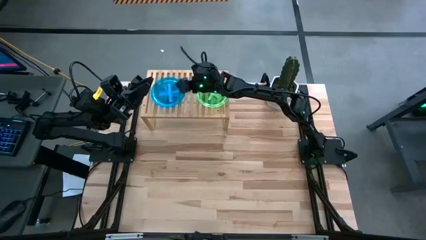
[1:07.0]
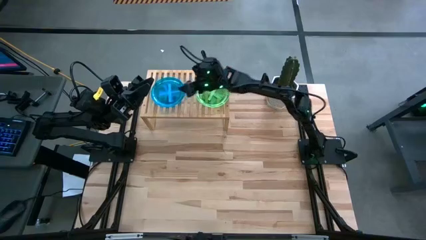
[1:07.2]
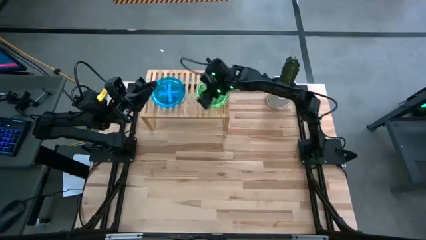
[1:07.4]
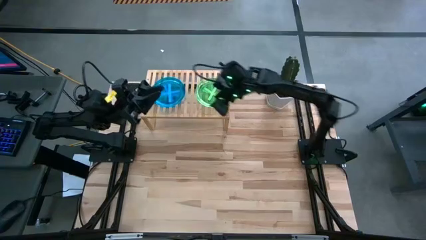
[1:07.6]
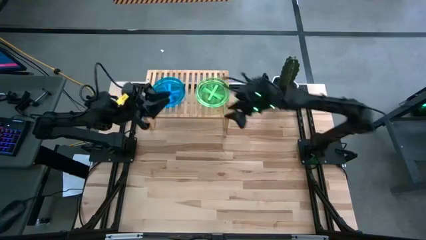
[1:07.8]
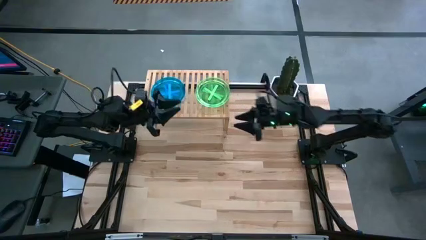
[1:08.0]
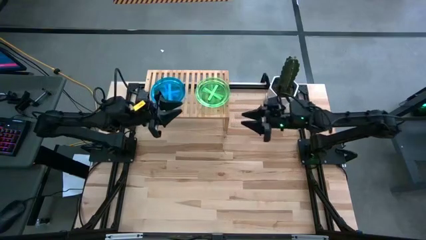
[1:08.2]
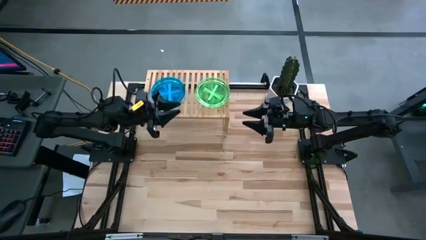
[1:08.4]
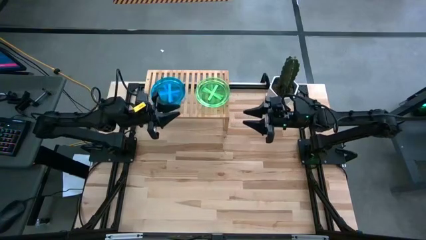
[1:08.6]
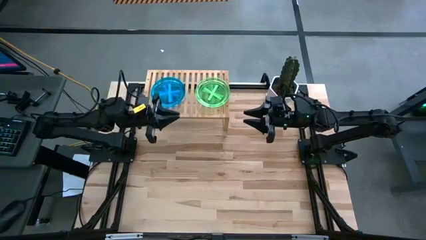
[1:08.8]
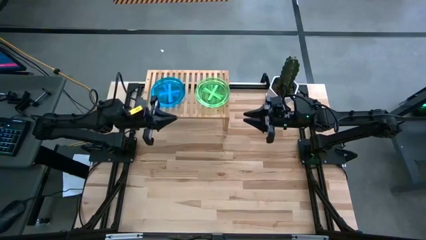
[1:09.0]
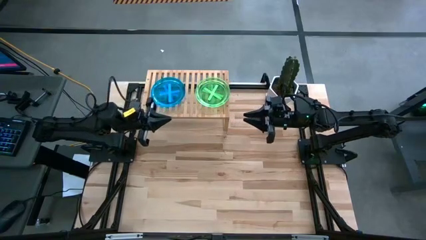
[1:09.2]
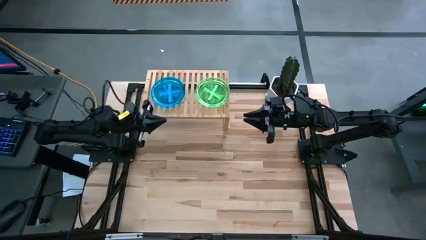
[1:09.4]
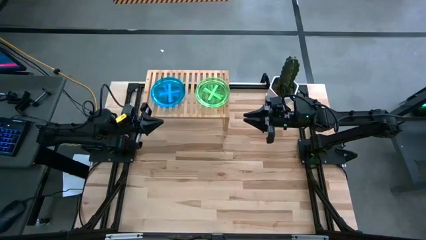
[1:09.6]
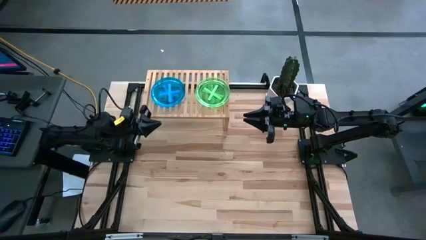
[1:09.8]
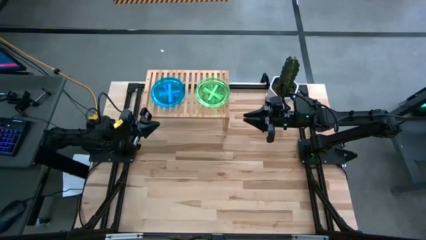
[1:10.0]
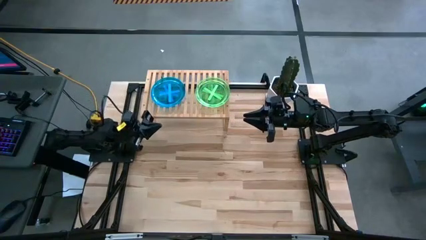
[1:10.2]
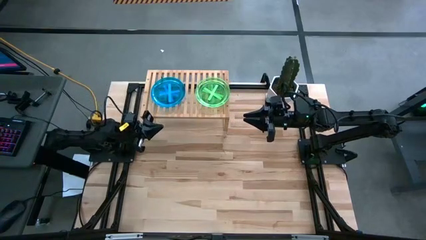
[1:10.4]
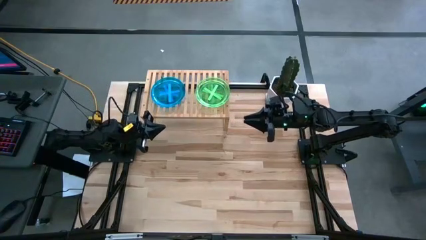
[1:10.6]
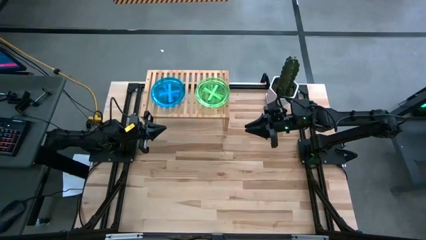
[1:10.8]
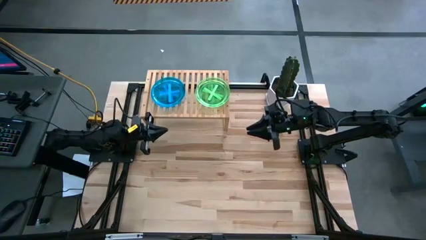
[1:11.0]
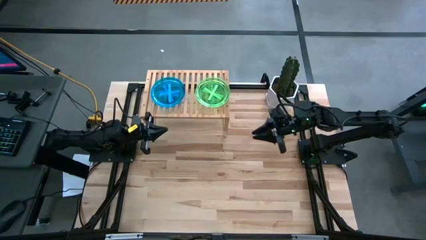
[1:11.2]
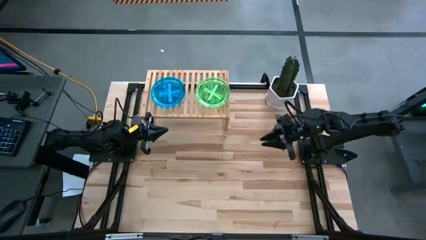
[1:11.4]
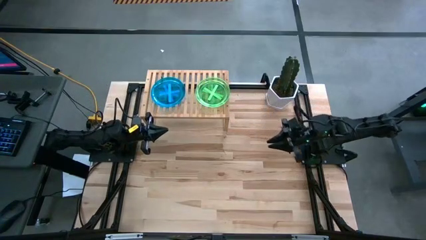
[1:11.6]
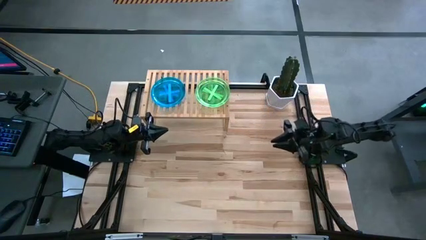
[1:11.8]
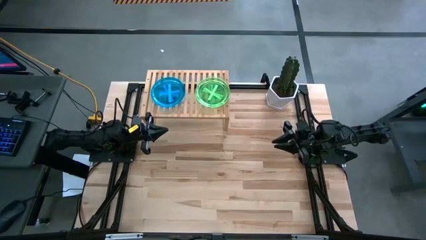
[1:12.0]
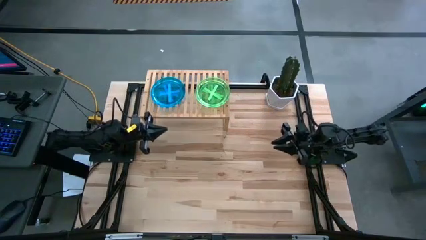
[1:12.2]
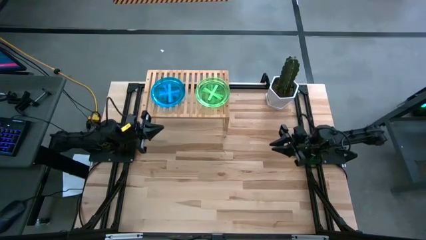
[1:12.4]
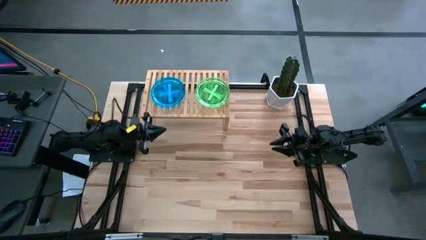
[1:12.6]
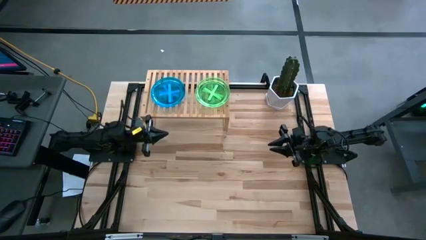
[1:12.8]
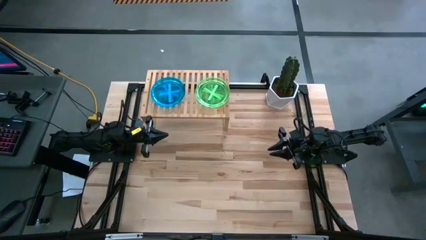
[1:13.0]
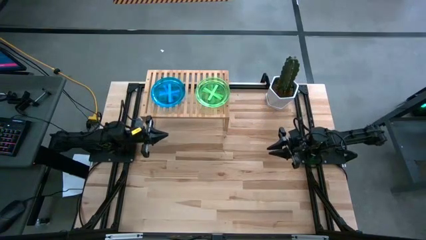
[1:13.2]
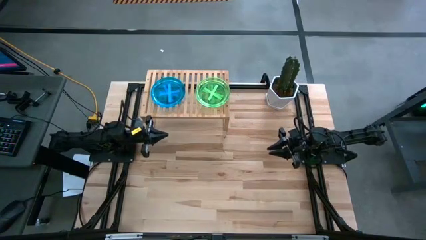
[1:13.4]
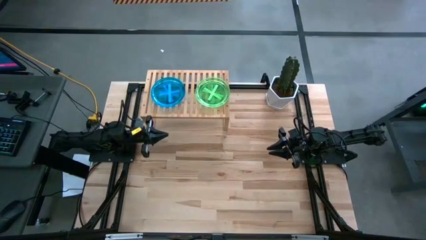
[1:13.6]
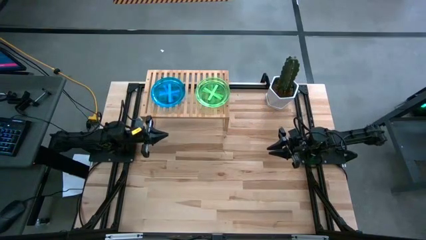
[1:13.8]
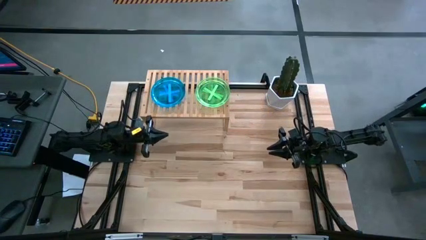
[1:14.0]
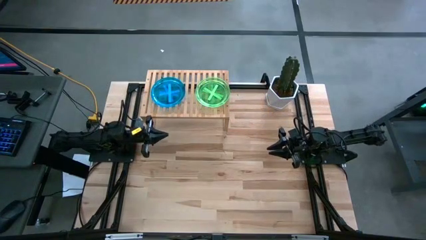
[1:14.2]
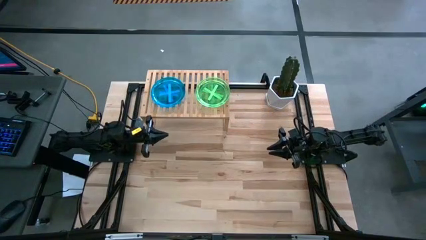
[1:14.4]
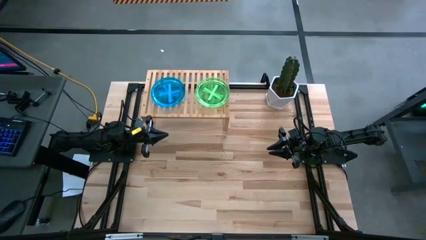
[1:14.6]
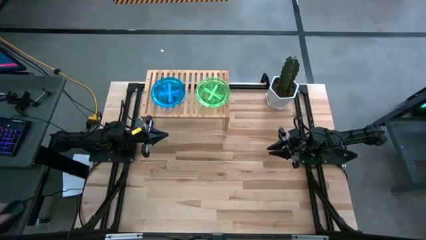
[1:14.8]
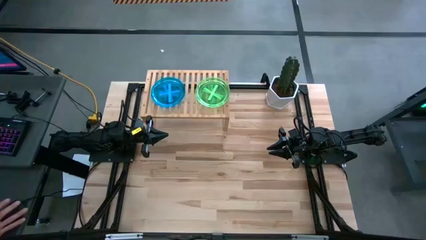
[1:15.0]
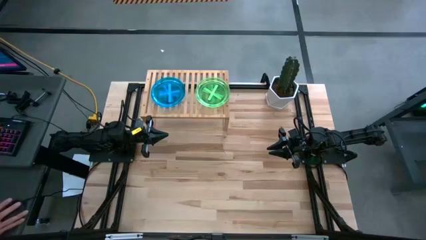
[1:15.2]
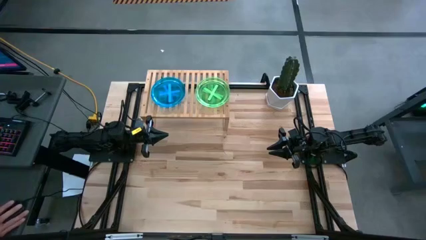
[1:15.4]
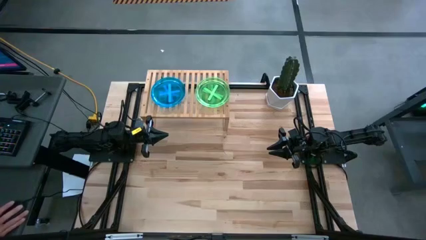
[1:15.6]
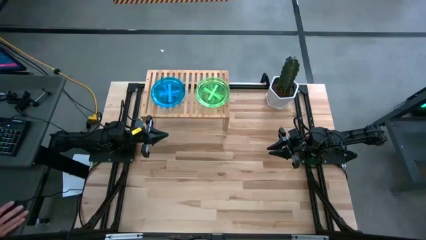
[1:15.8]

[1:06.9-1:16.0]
Task: Place and stack plates onto a shelf
Return to Home Position

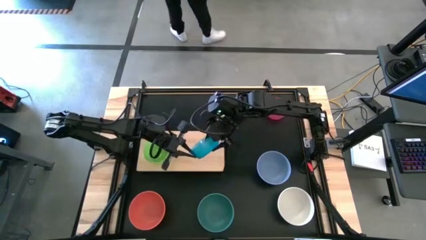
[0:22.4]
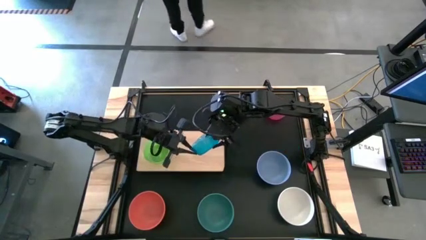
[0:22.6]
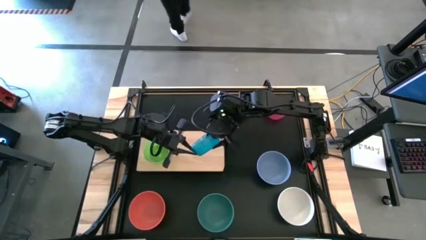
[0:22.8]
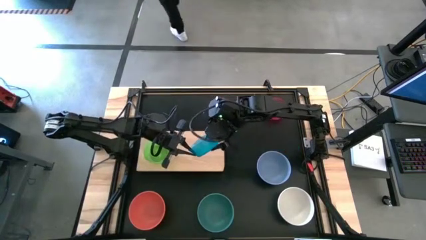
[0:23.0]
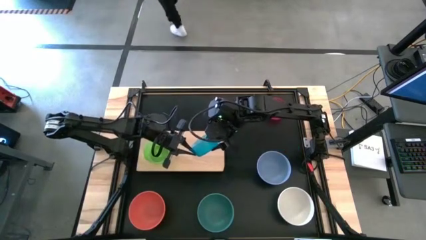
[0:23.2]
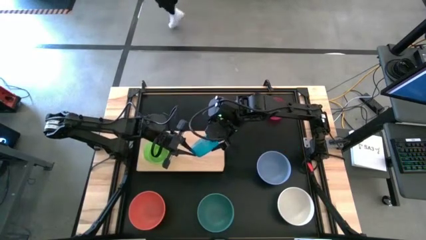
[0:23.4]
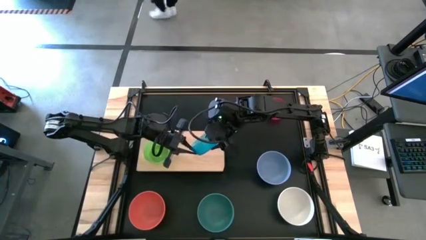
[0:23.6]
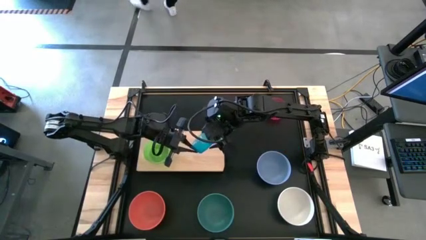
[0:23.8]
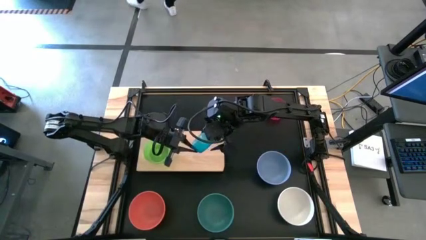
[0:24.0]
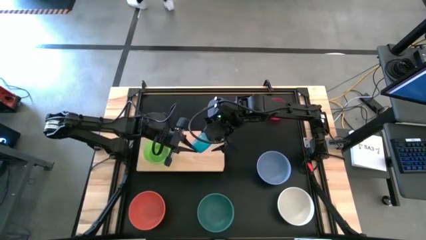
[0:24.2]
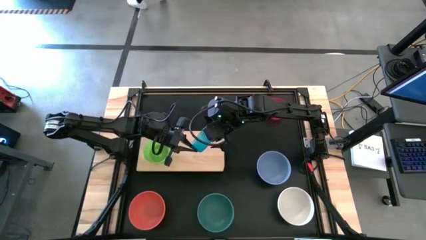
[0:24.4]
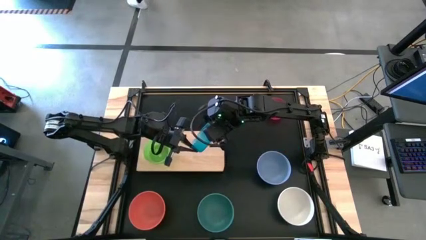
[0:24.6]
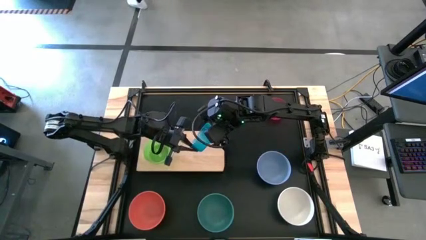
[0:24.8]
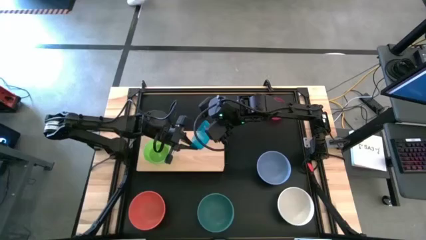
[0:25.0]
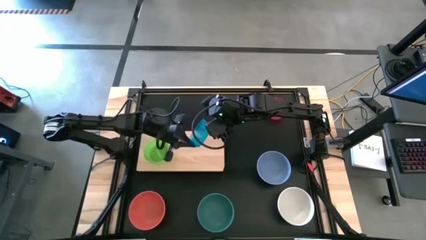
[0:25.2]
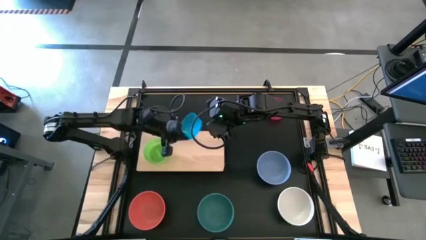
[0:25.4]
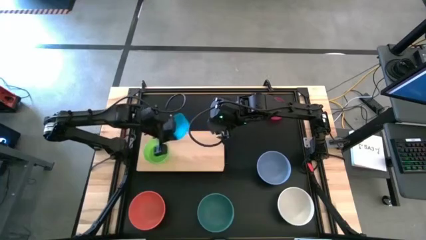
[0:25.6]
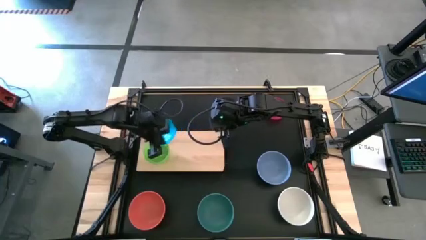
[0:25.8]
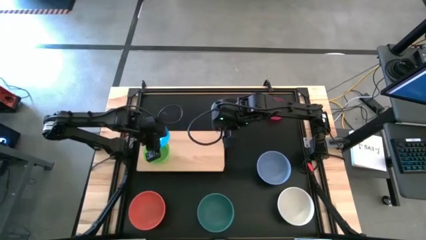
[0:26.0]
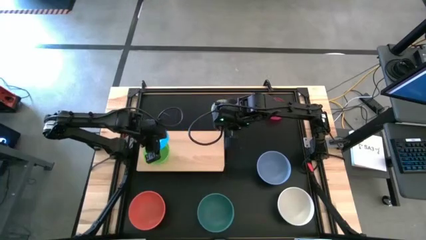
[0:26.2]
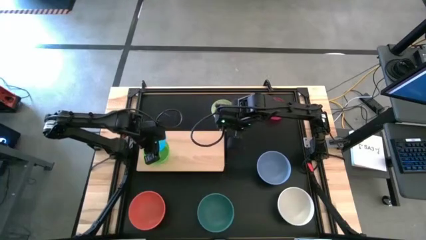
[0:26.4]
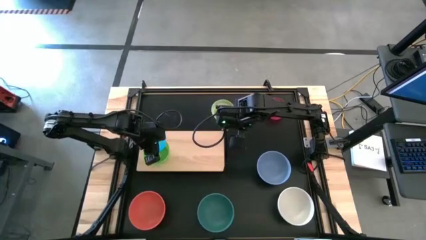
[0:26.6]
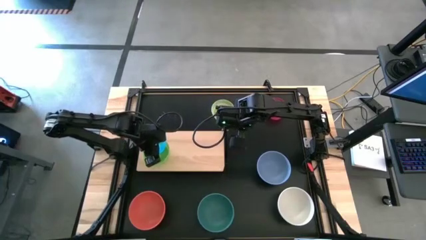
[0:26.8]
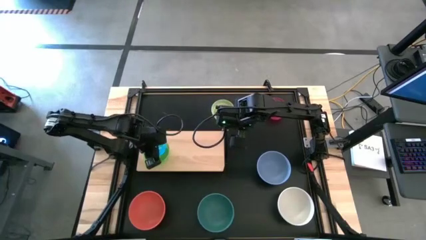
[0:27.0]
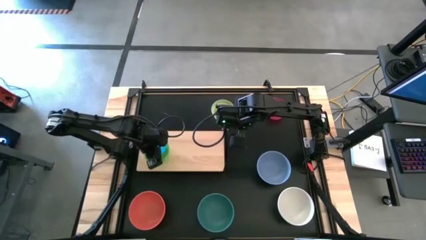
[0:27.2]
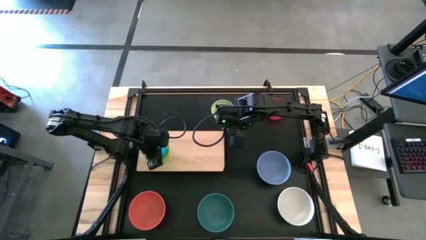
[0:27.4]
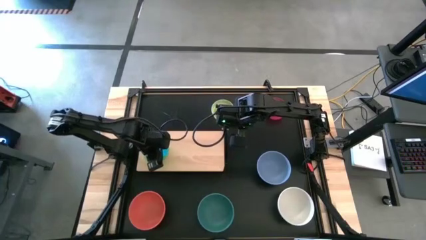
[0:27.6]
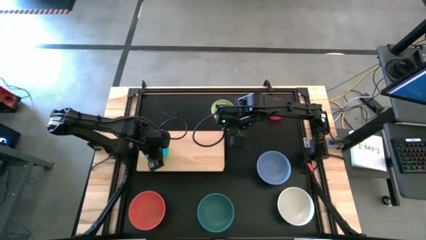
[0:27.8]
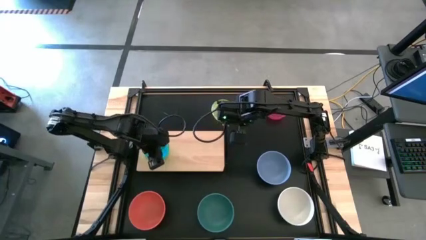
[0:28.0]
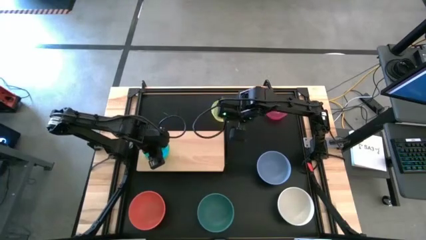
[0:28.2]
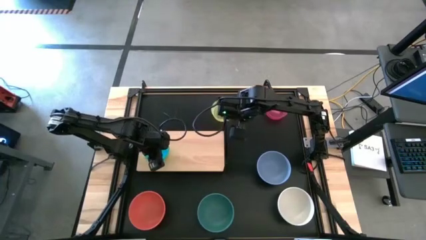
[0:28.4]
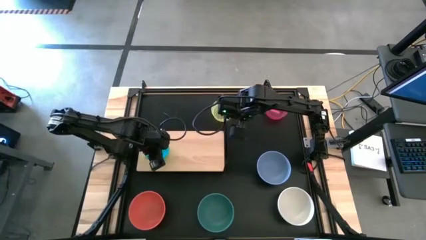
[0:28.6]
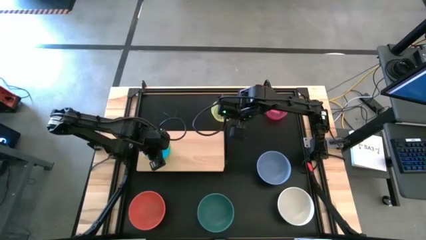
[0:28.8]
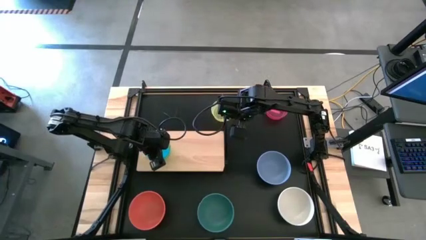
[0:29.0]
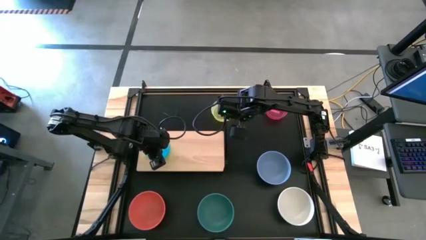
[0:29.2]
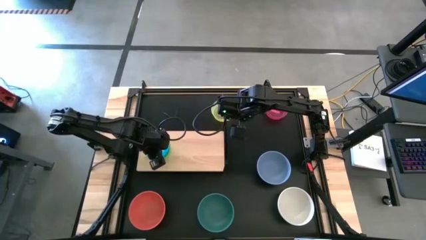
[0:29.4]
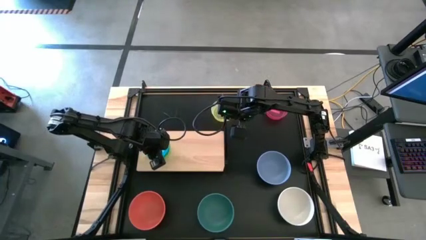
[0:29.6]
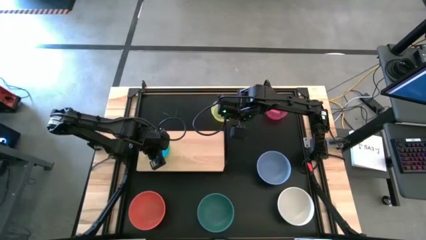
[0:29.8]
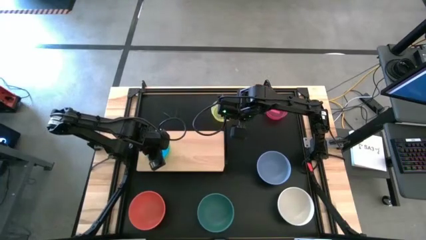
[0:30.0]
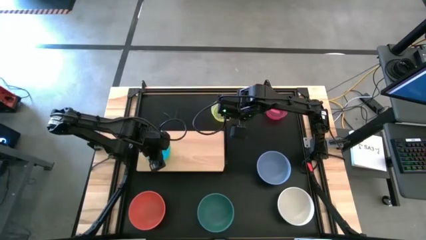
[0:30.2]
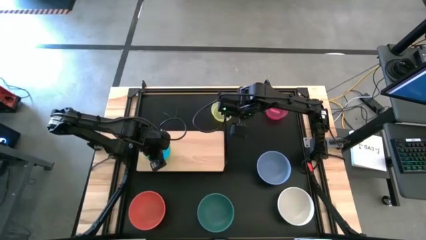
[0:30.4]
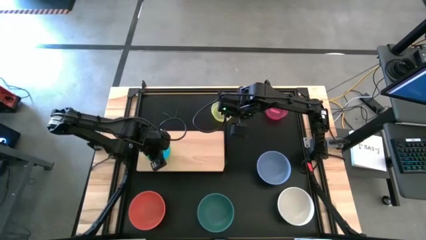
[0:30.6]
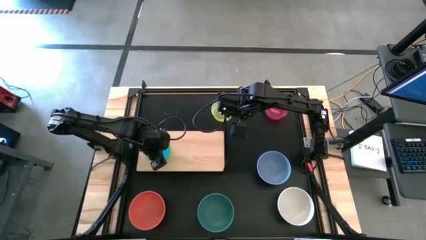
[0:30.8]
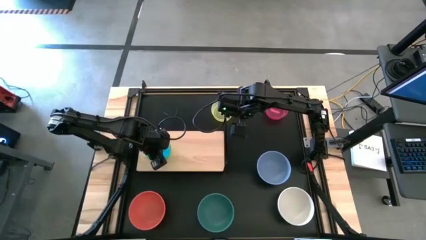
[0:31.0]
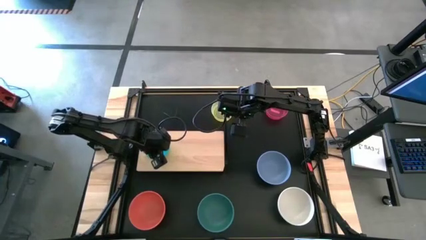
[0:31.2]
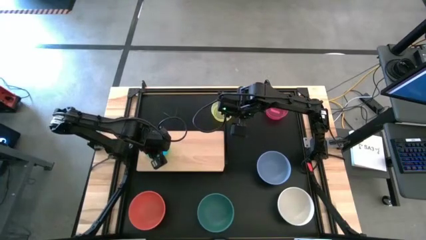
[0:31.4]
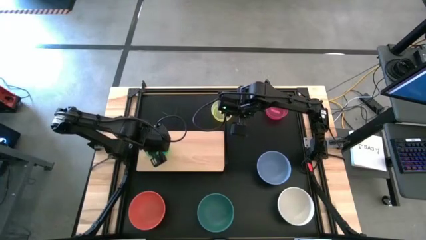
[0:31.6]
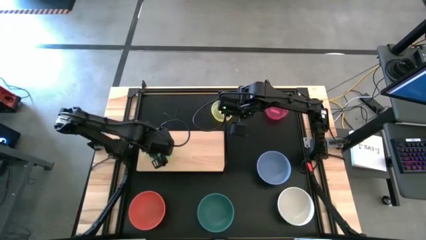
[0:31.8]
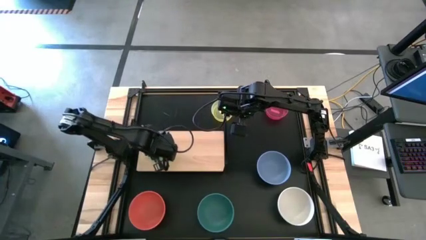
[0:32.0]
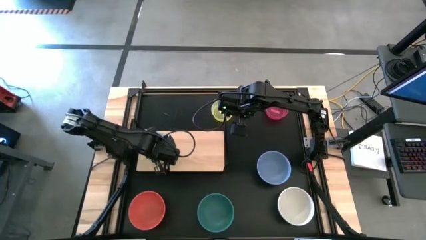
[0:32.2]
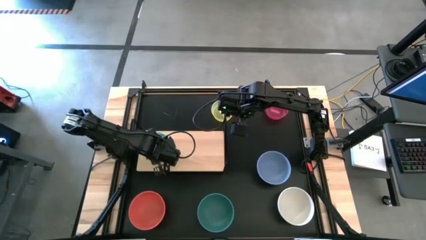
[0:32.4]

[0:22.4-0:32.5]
Task: Place and stack bowls onto a shelf
Stack the small blue bowl on top of the small green bowl on the shelf
